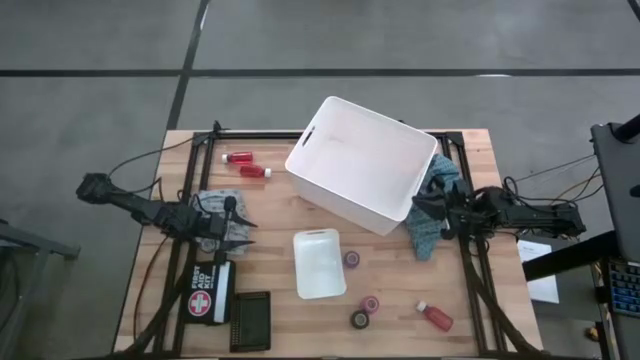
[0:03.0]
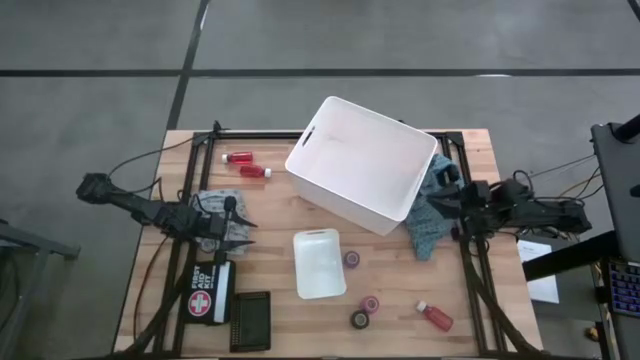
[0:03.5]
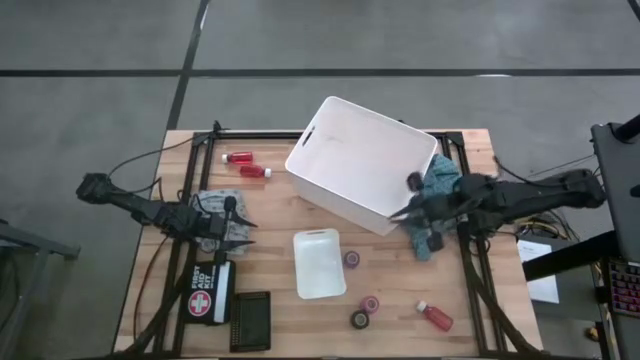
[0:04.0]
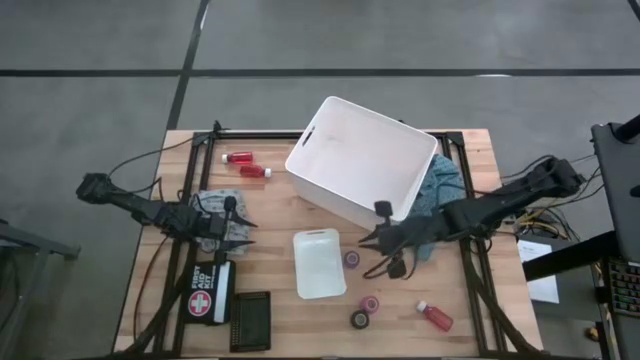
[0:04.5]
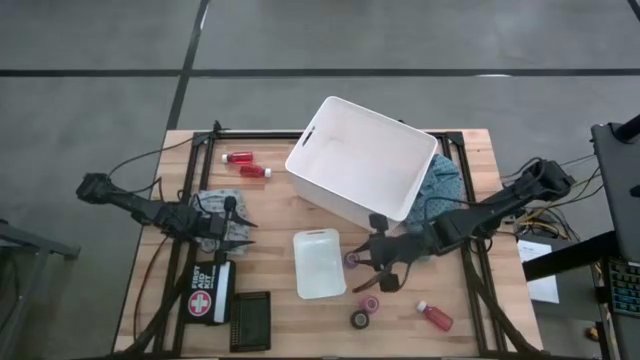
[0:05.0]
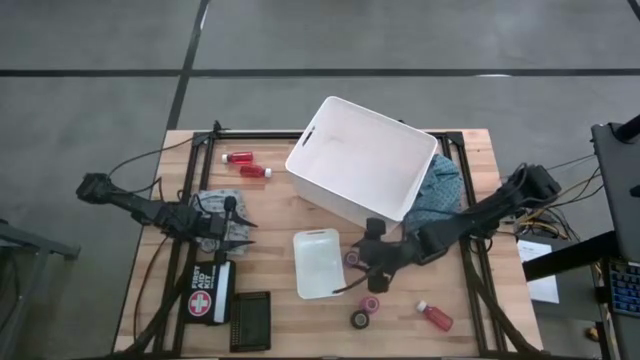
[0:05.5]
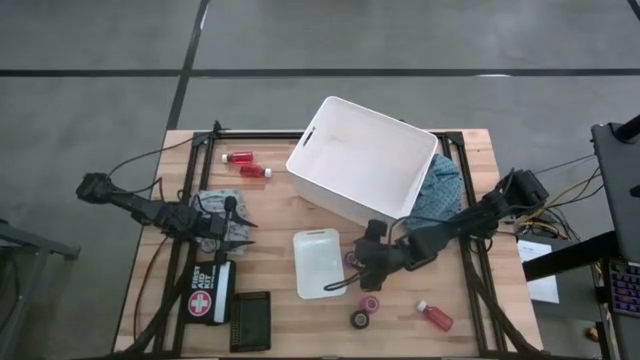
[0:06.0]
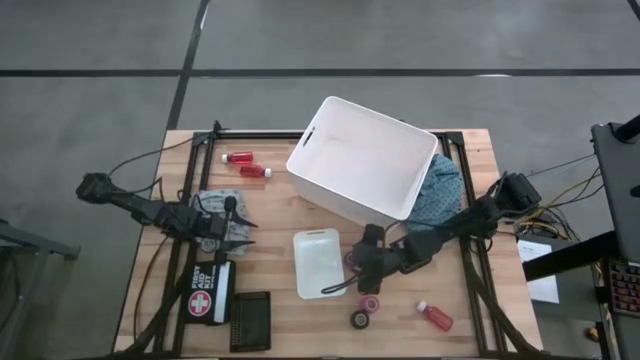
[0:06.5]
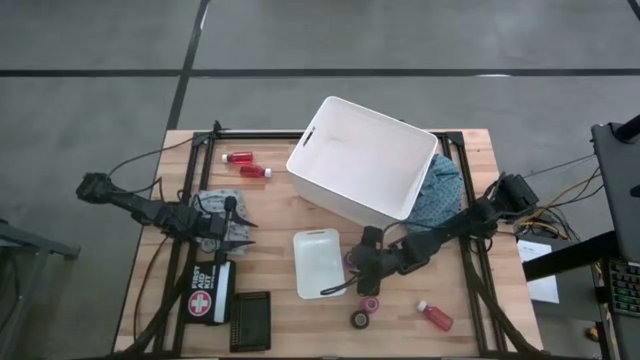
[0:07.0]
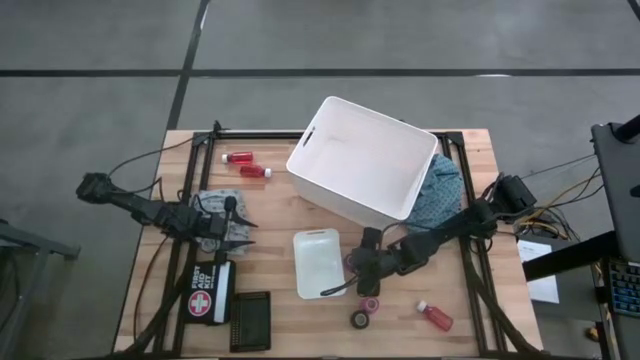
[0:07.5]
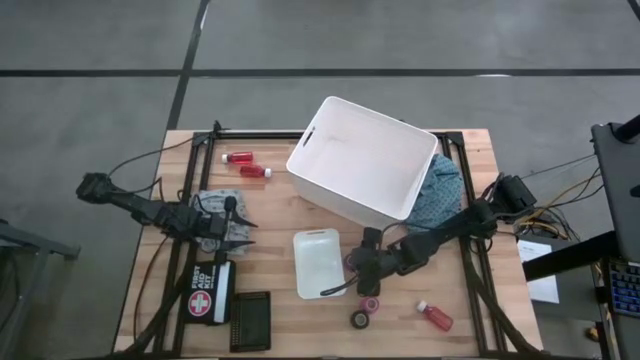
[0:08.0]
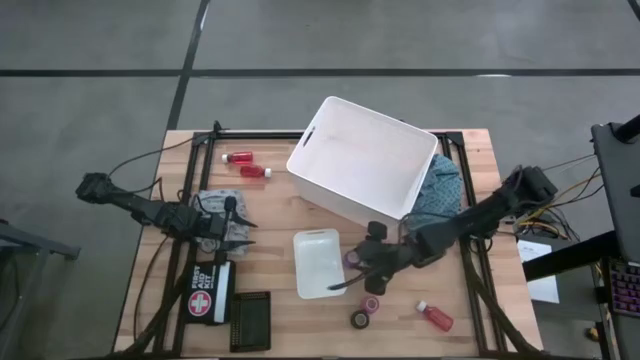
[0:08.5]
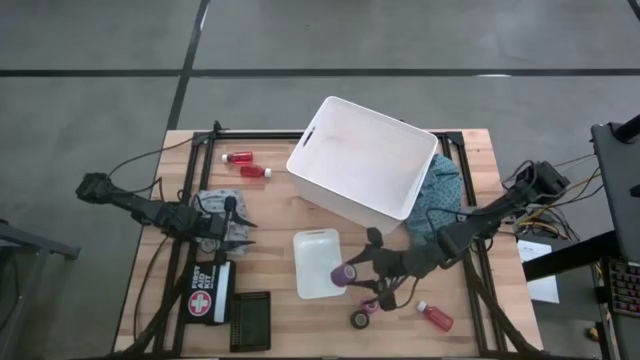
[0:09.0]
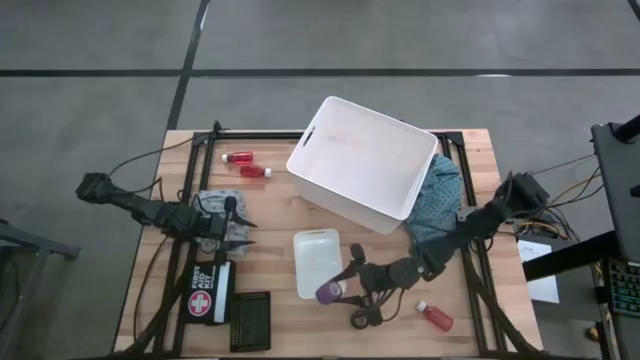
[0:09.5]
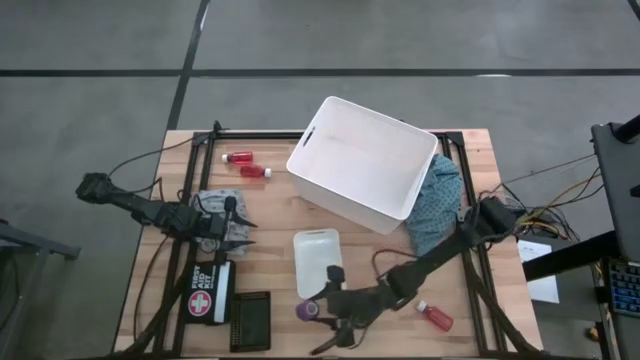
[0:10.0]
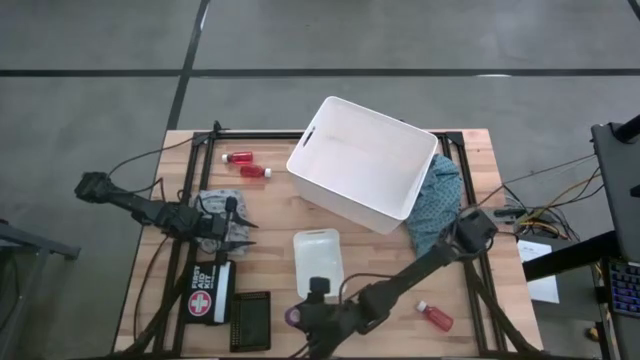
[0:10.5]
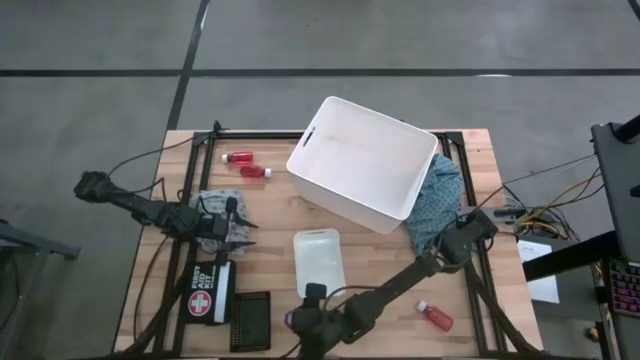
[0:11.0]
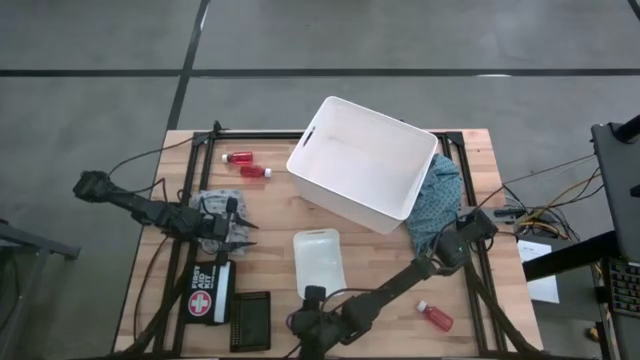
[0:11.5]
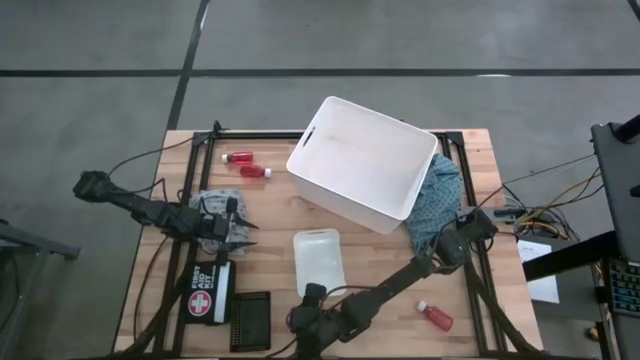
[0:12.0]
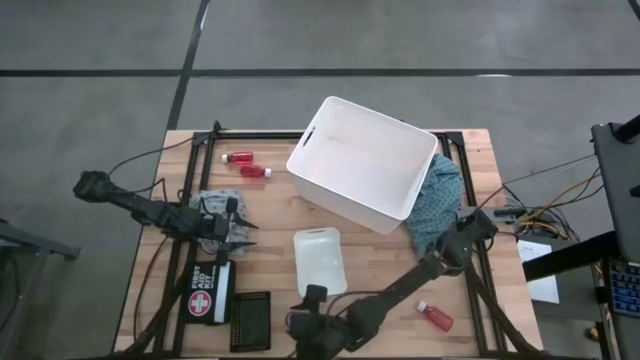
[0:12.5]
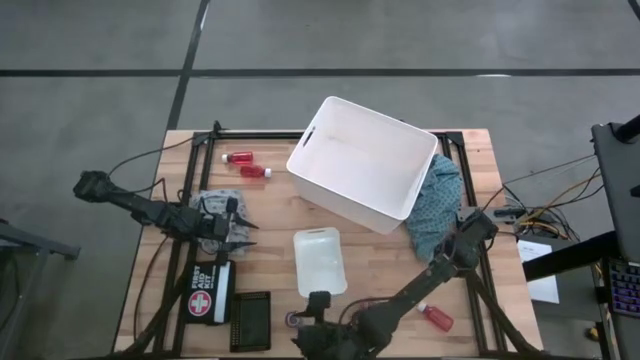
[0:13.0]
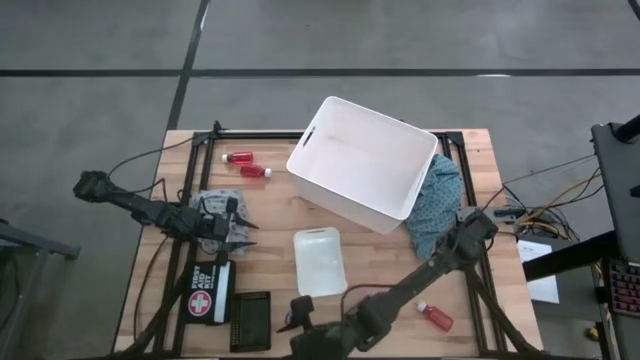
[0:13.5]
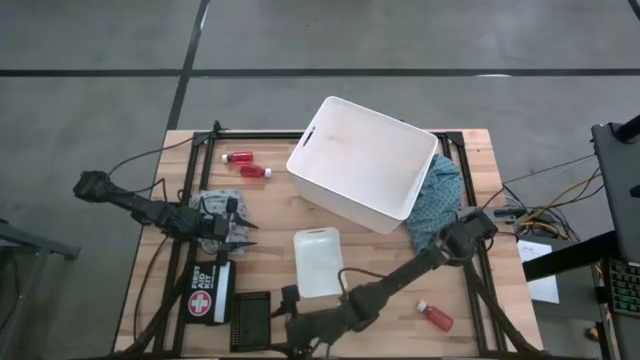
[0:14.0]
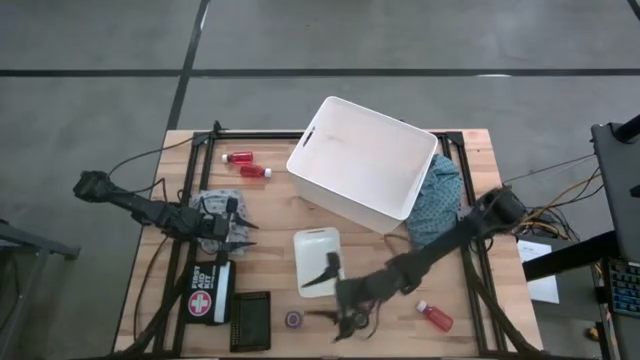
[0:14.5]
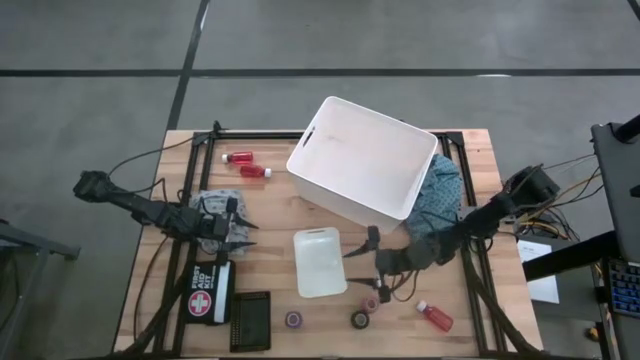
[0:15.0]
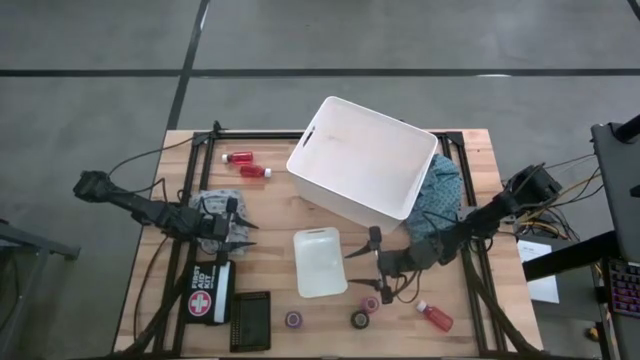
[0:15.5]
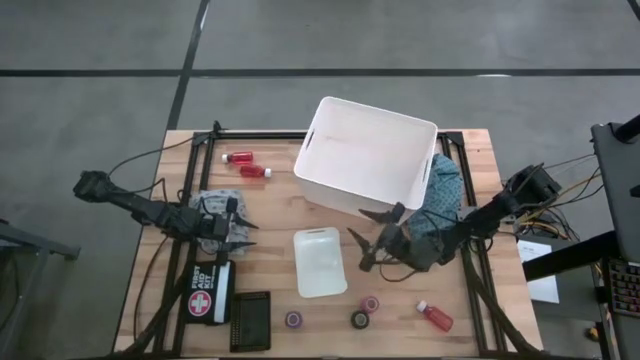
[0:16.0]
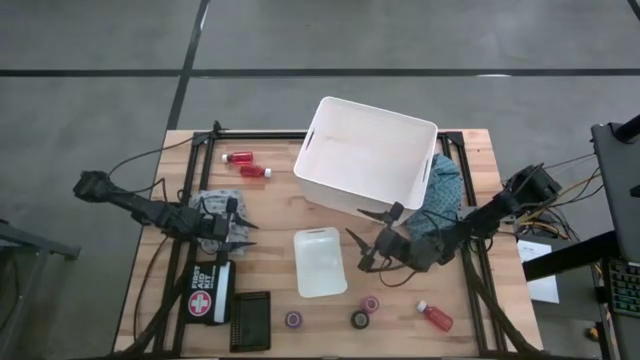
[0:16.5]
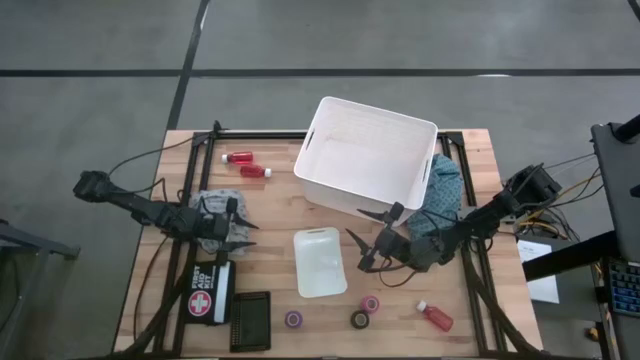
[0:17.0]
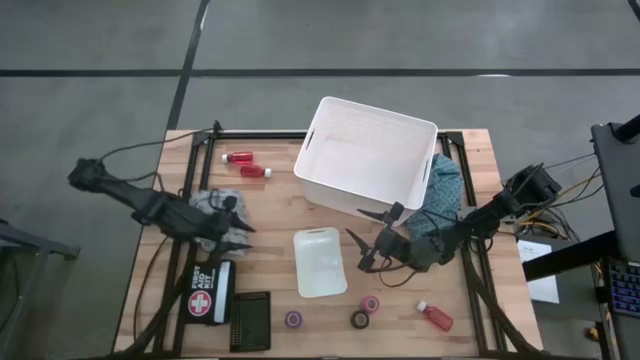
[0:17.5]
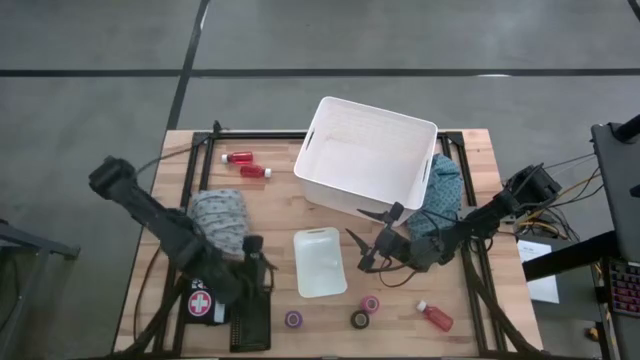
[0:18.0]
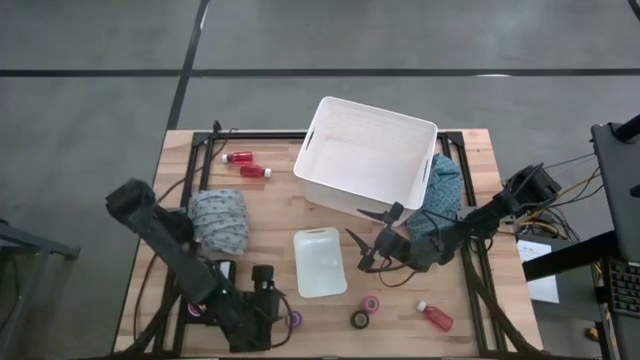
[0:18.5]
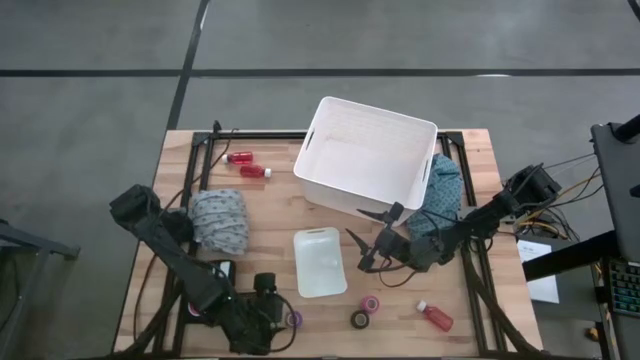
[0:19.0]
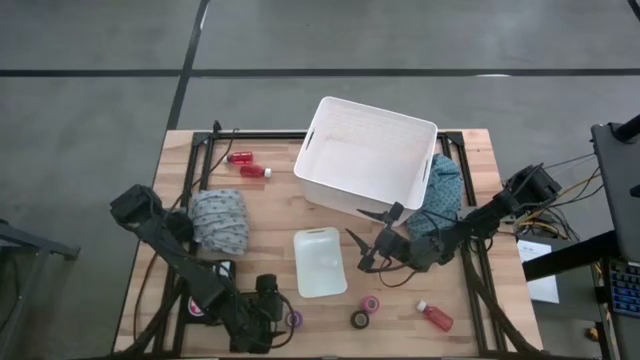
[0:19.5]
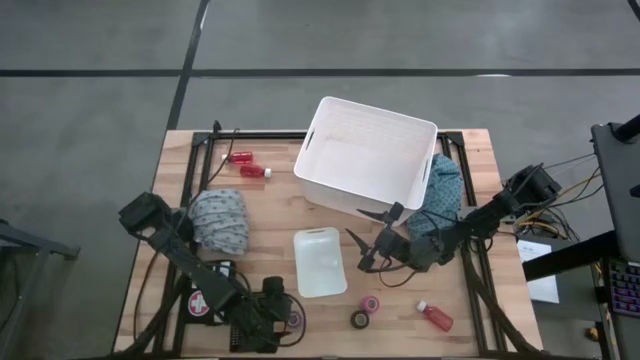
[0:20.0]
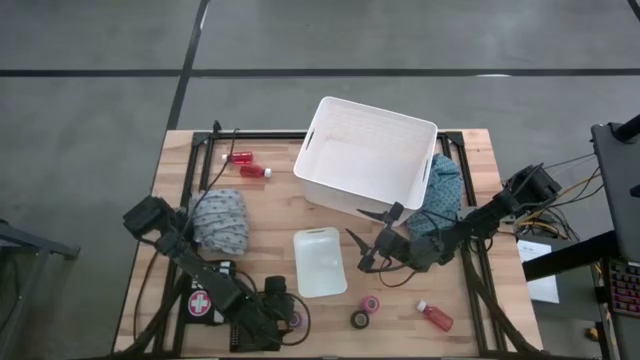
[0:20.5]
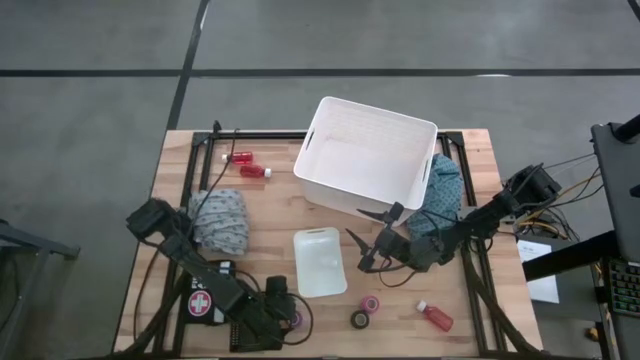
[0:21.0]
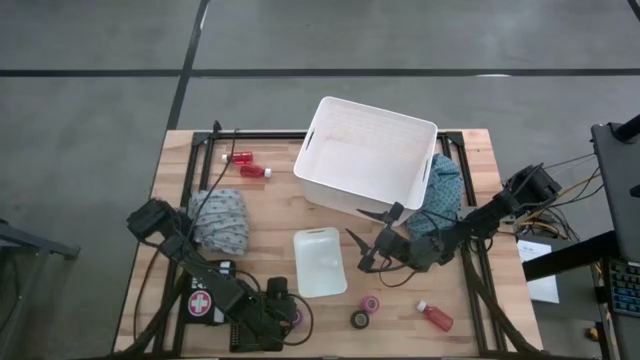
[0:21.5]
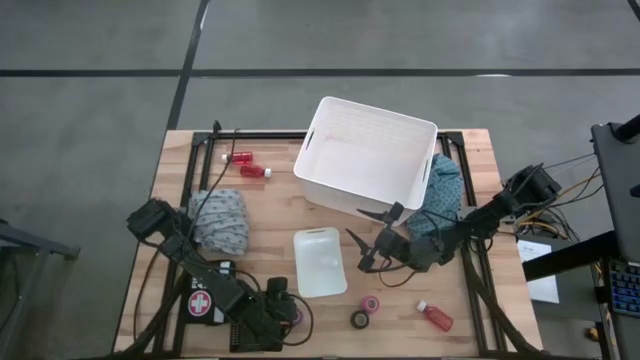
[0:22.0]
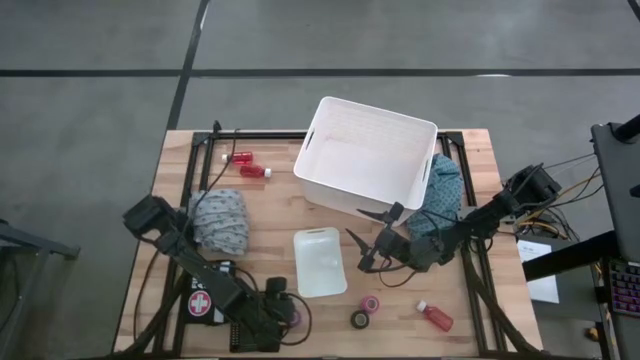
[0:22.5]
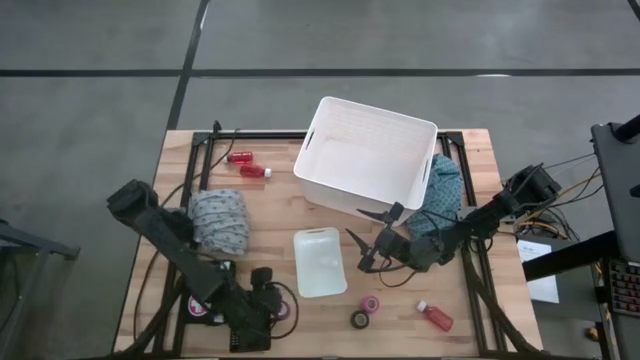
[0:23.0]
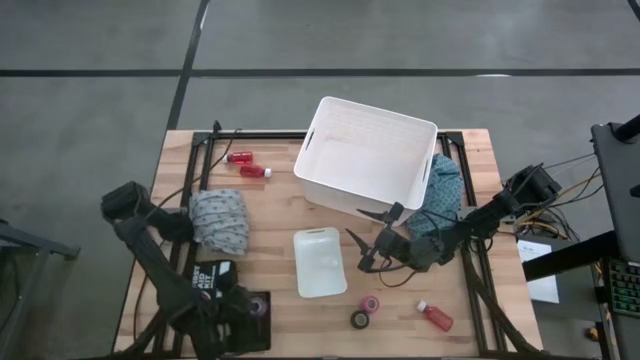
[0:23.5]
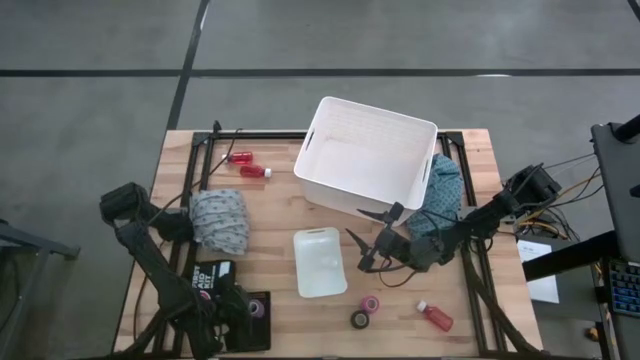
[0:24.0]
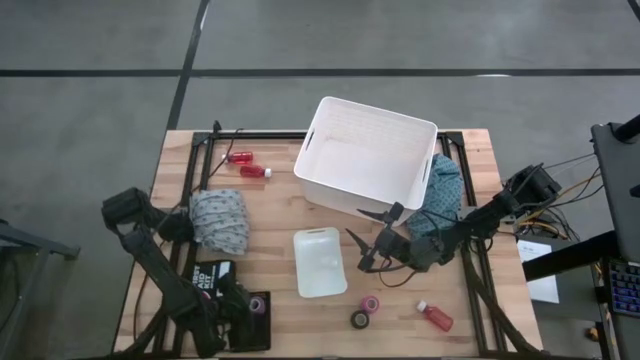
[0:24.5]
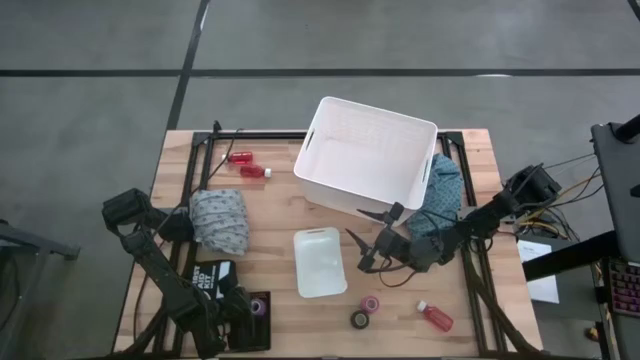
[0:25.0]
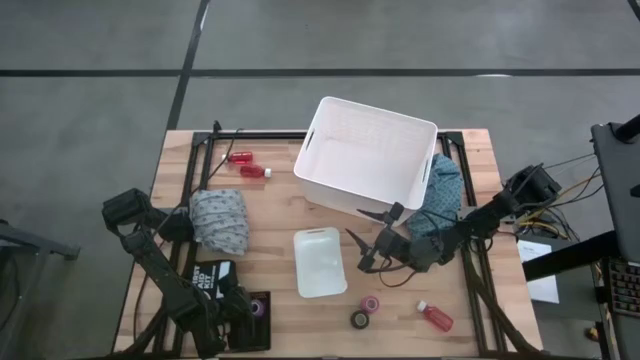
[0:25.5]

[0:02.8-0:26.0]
Task: Pick & Place Medicine items
Put the violet bandage into the black bin
